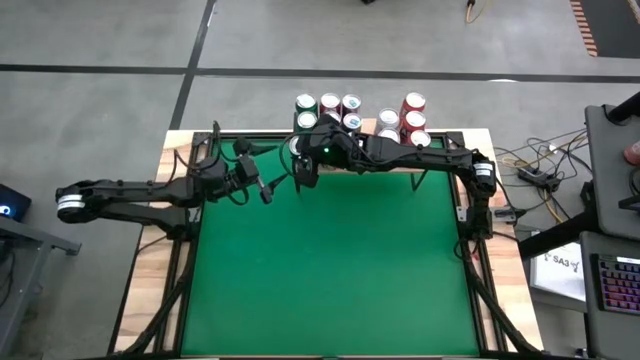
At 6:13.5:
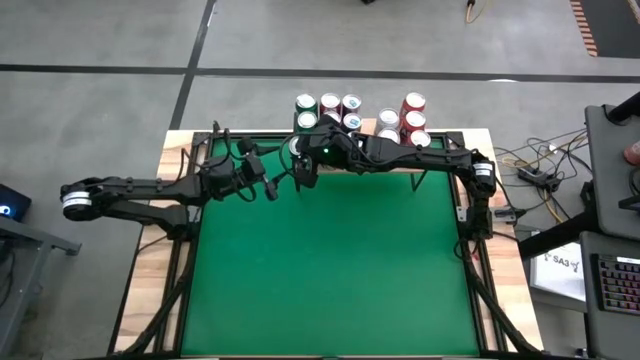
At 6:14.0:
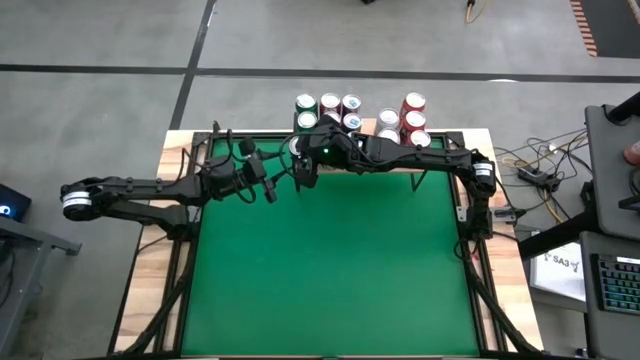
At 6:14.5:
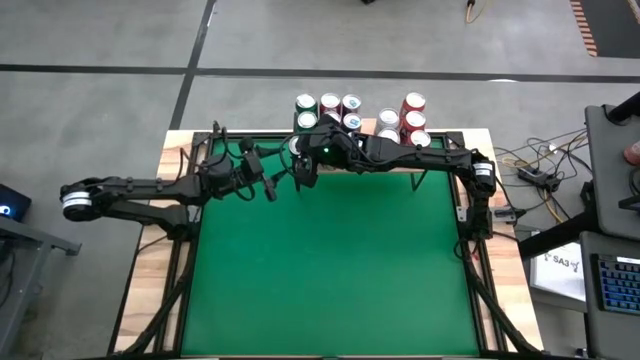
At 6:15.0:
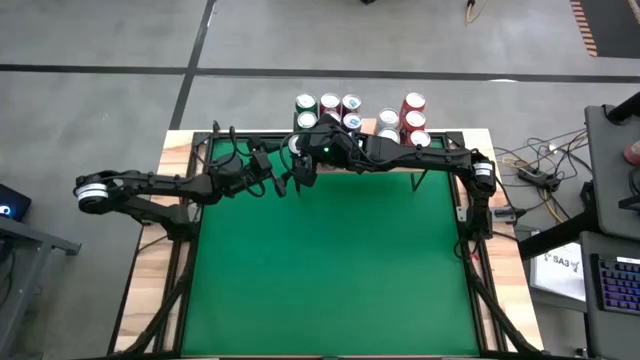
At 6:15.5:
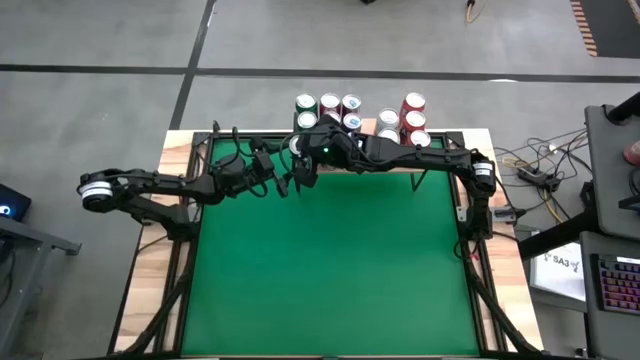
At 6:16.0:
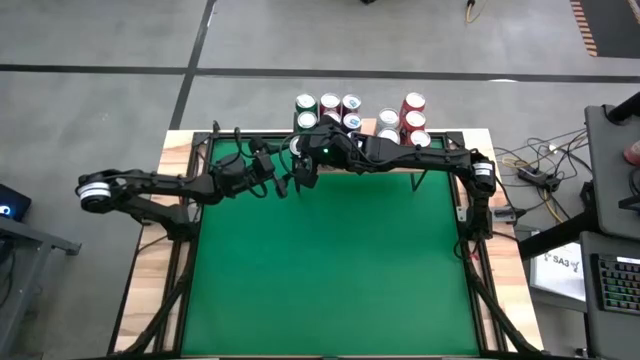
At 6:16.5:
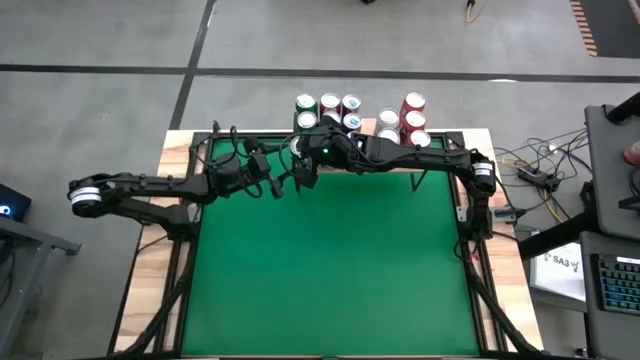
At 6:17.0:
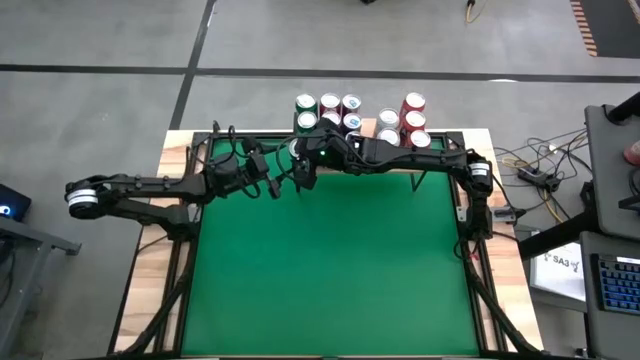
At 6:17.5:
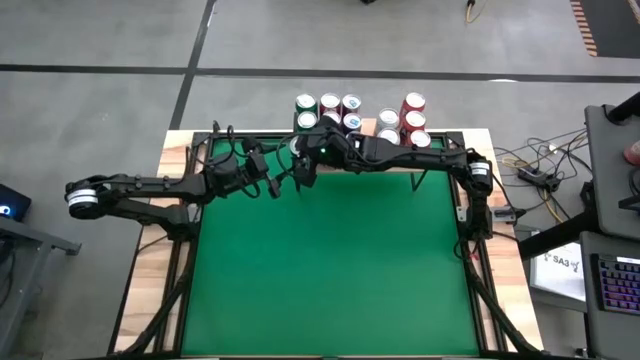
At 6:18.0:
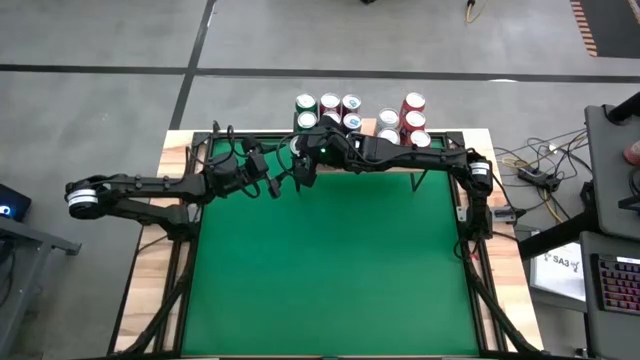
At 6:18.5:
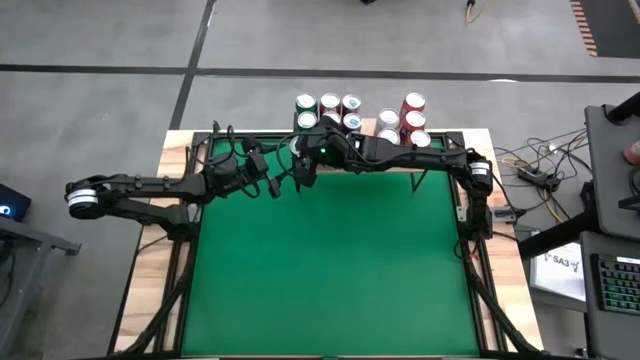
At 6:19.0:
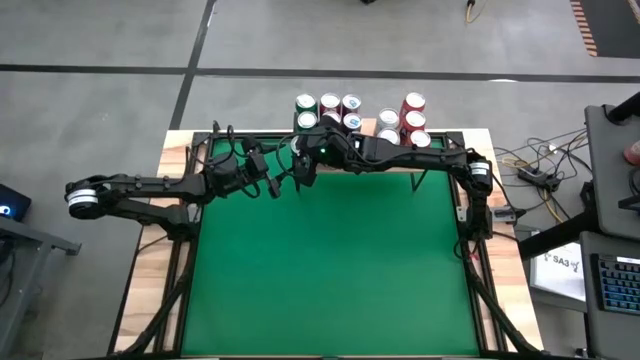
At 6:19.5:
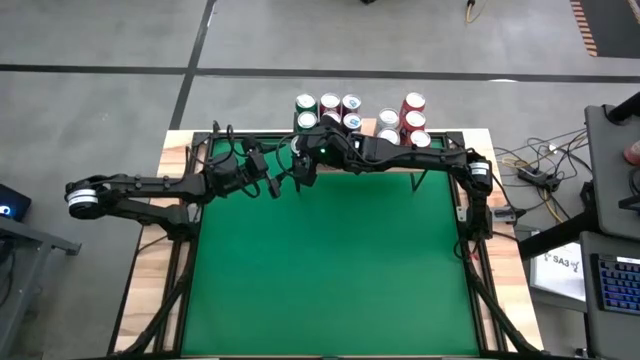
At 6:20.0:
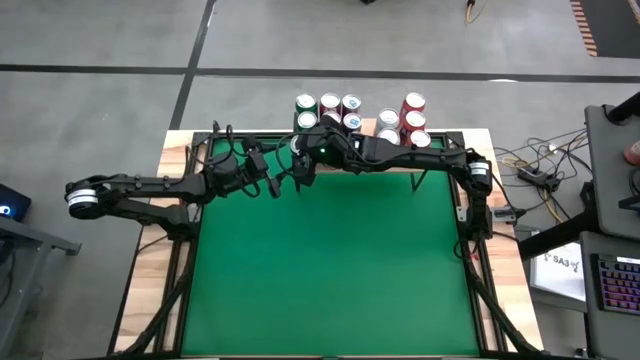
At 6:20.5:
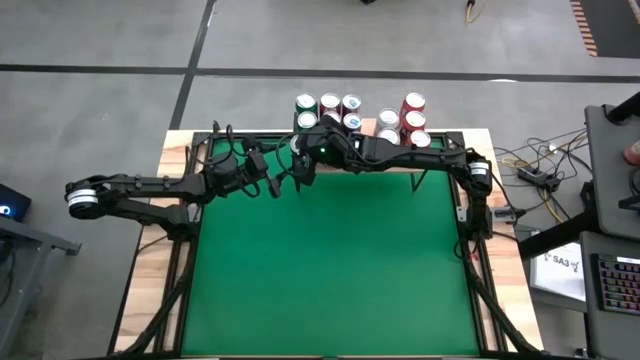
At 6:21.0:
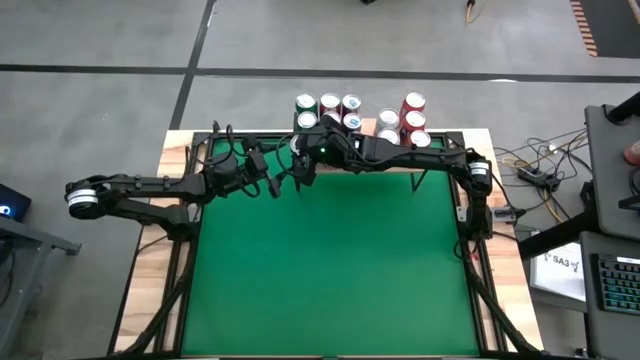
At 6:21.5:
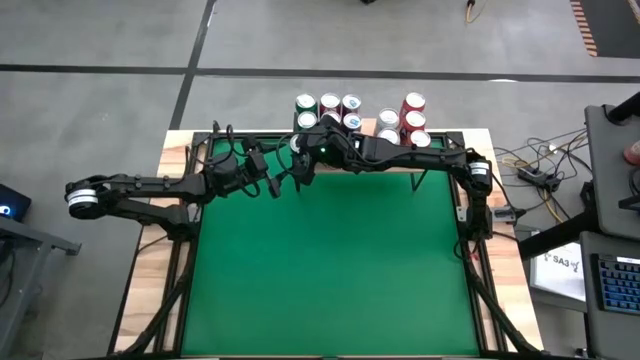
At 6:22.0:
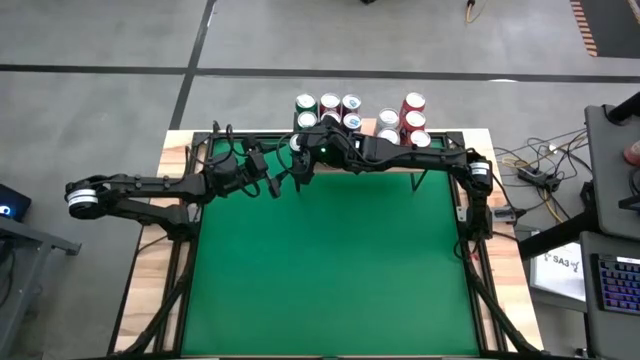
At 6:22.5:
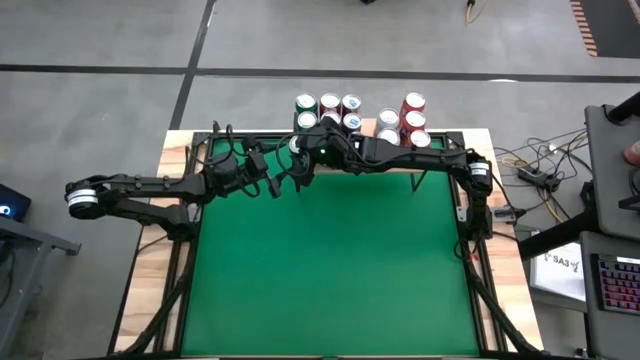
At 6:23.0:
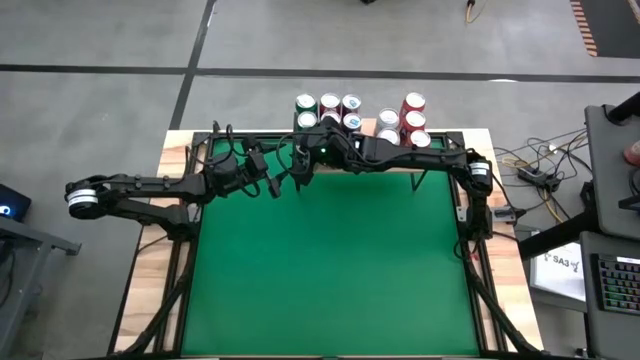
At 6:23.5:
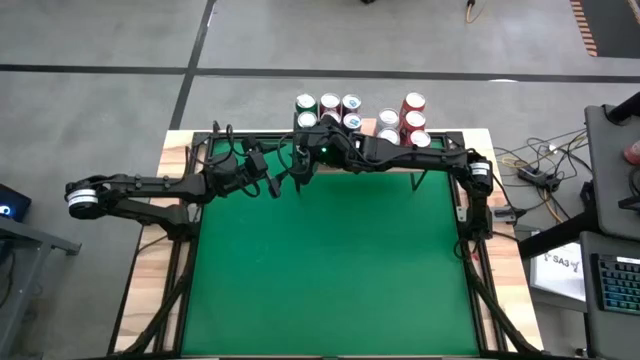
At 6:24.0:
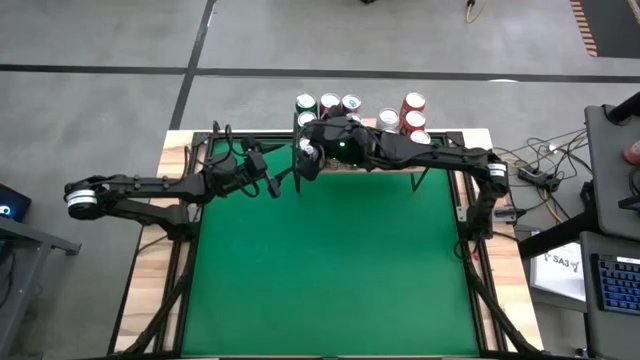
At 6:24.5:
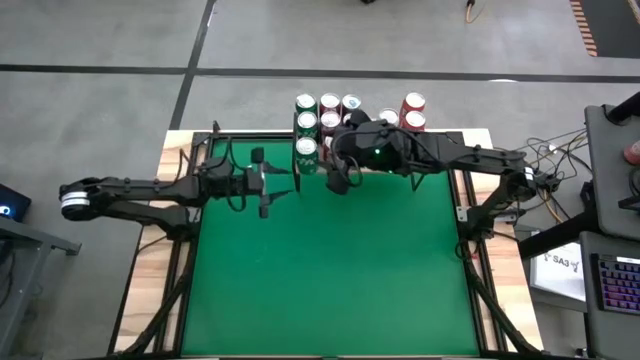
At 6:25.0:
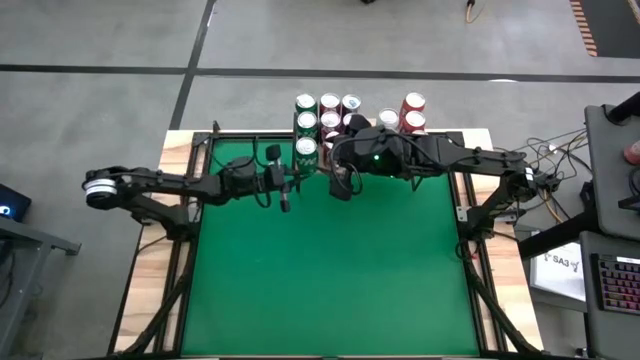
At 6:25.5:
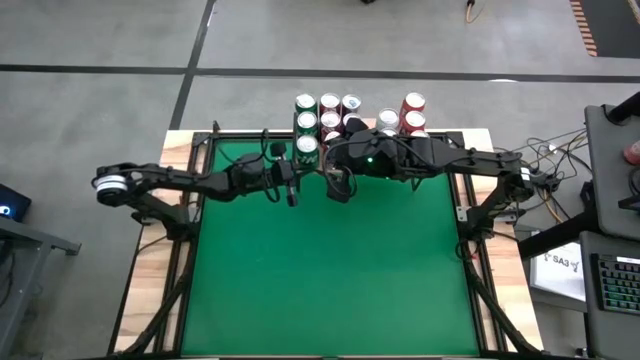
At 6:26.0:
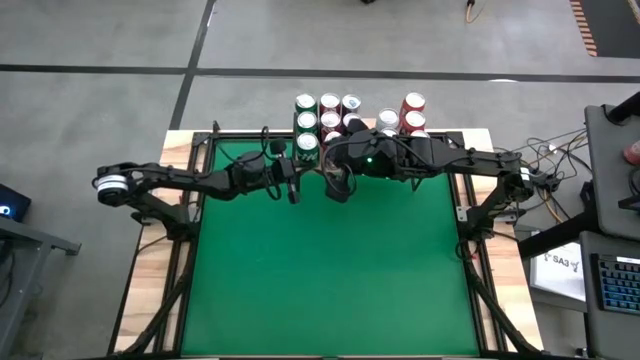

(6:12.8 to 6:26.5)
Task: Place canned beverage on shelf
Put the green soda can aligned with the green soda can on the shelf

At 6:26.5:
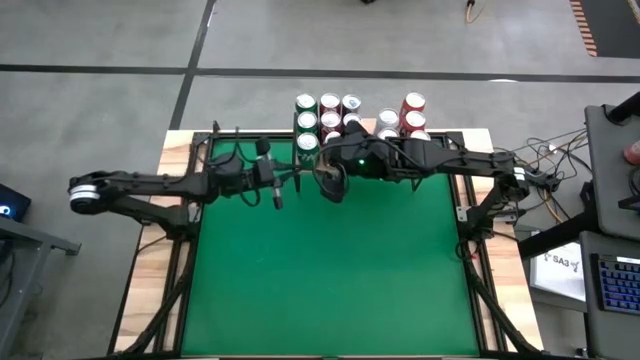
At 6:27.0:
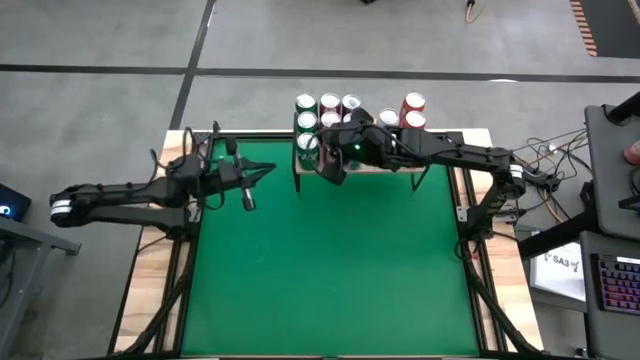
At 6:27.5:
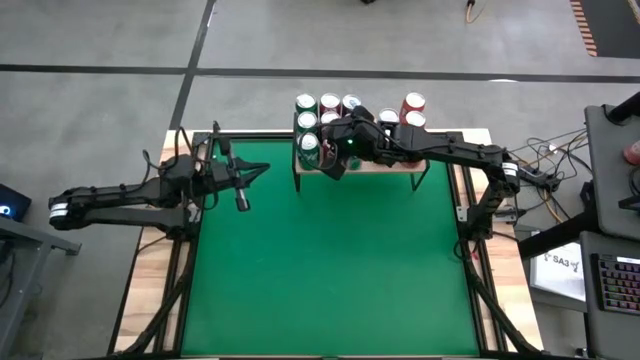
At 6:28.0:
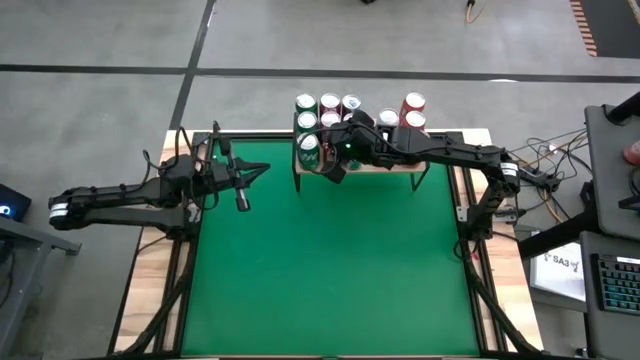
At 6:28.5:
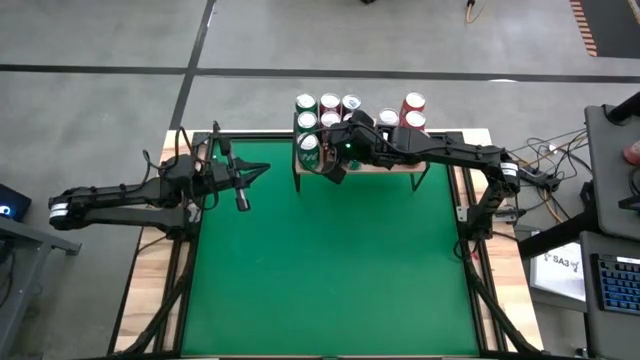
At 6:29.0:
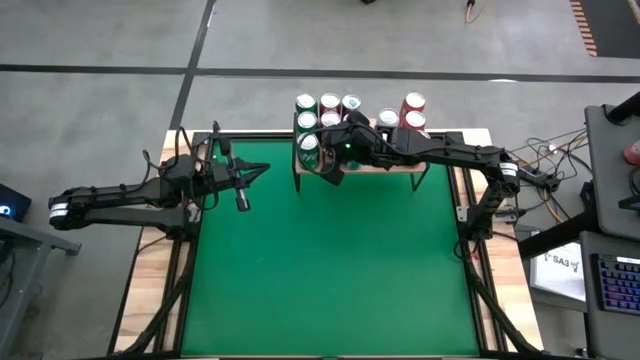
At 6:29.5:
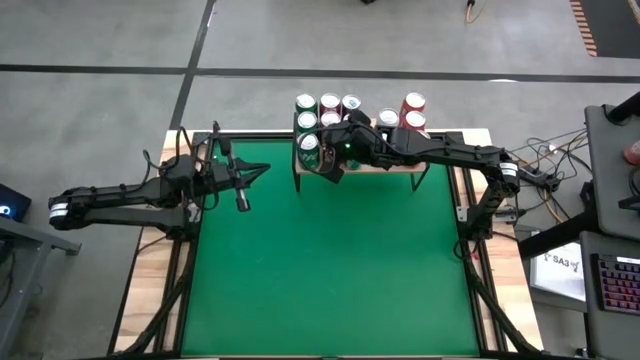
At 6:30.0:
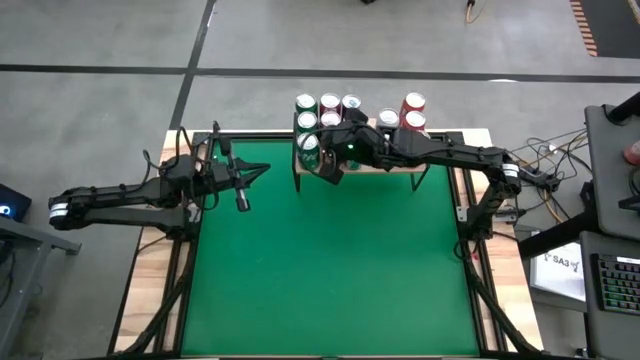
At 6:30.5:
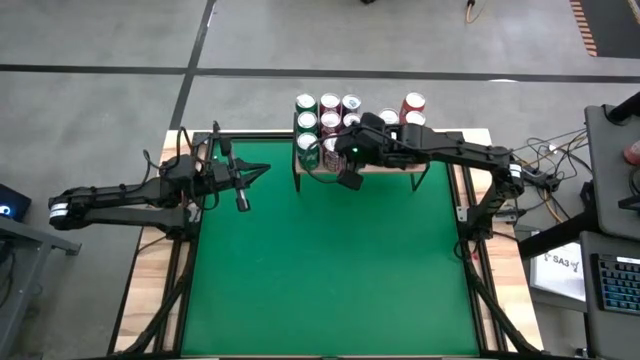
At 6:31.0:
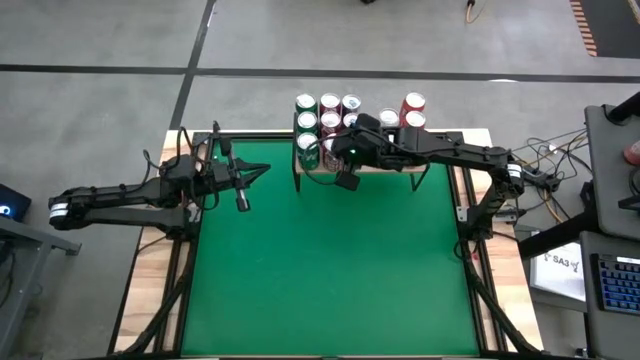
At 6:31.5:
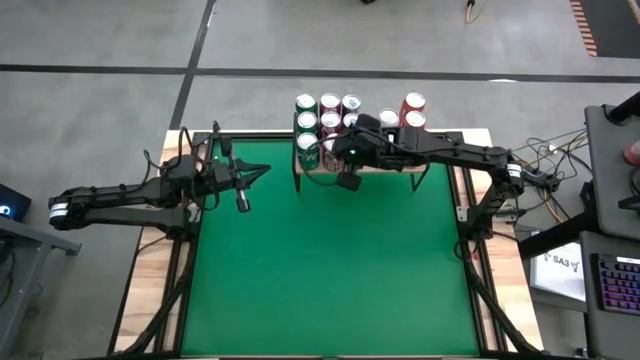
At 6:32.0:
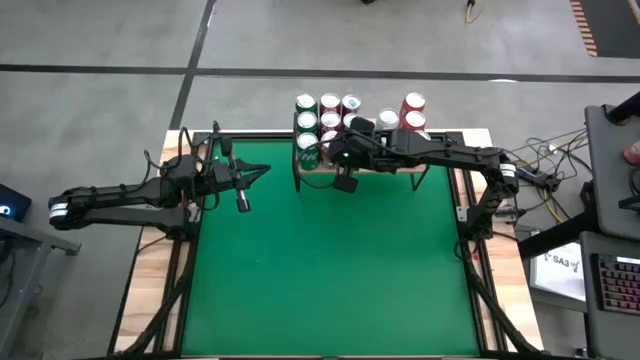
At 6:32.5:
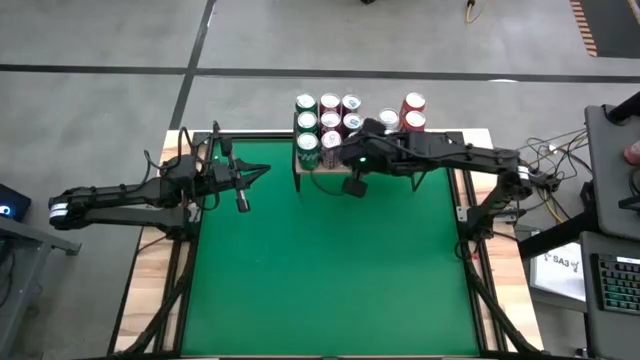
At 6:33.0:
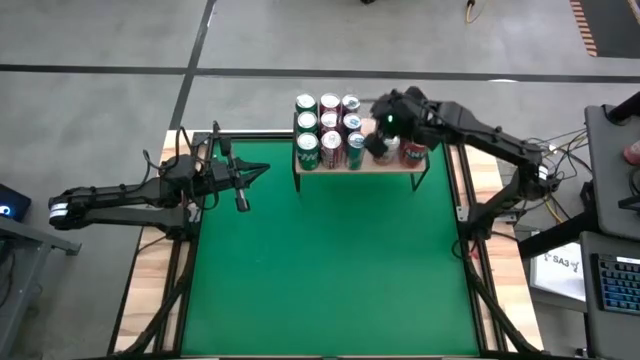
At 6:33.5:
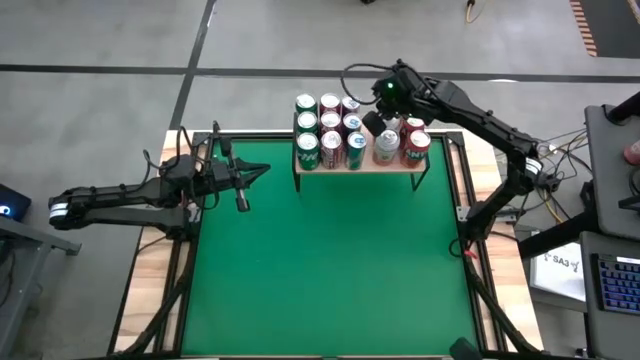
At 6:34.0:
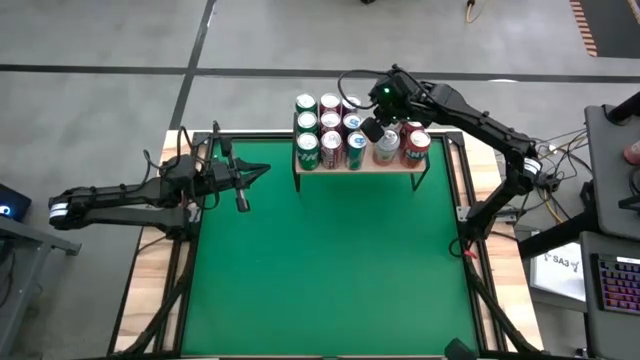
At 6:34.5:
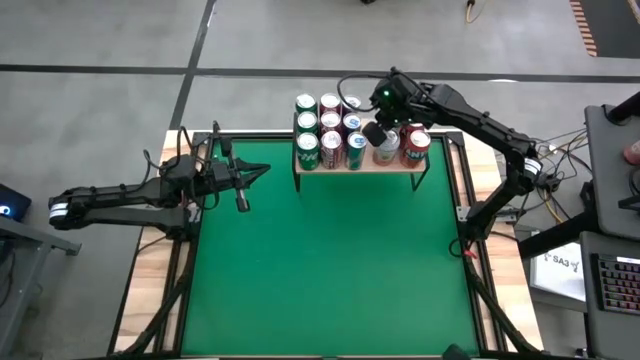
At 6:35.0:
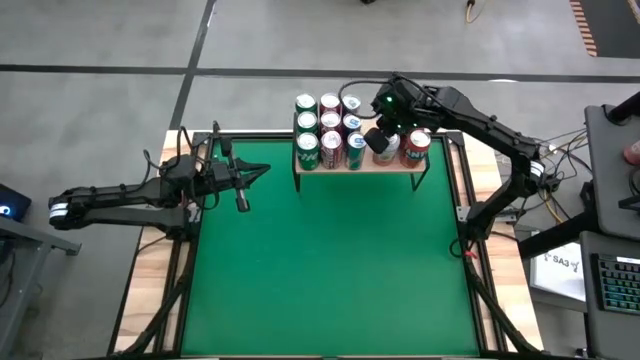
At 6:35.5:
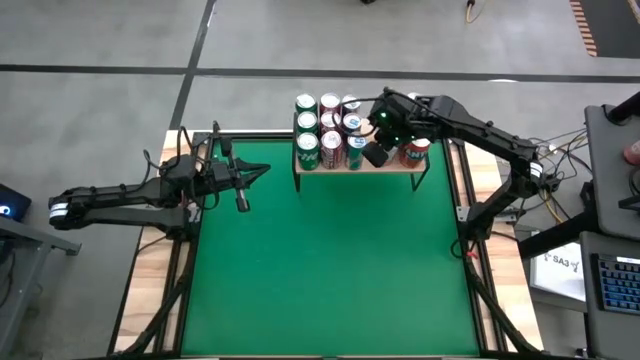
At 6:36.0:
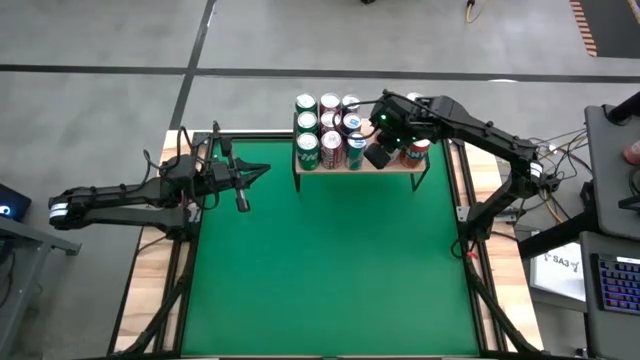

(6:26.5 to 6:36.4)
Adjust the soda cans on the shelf
